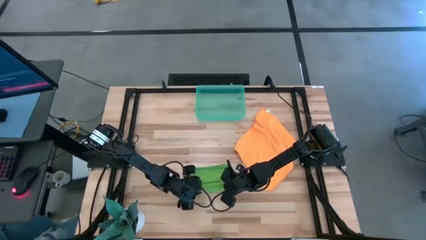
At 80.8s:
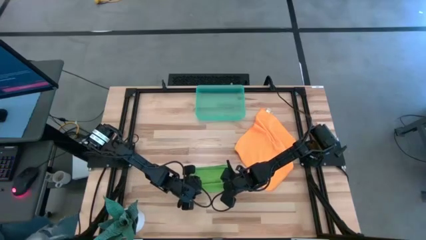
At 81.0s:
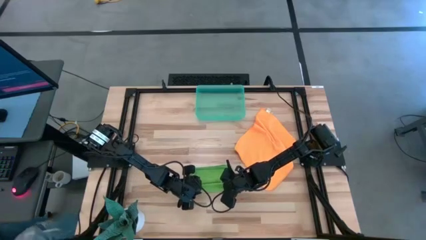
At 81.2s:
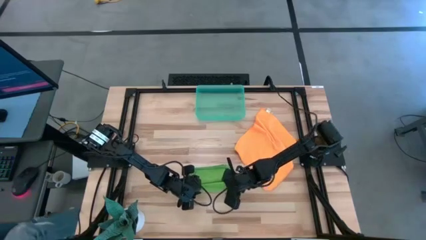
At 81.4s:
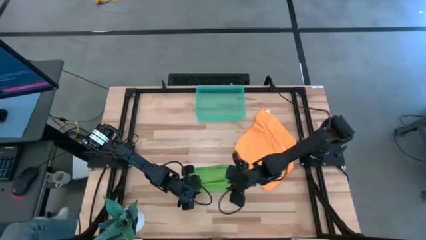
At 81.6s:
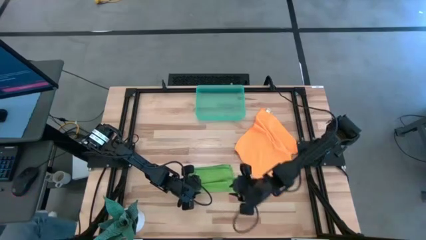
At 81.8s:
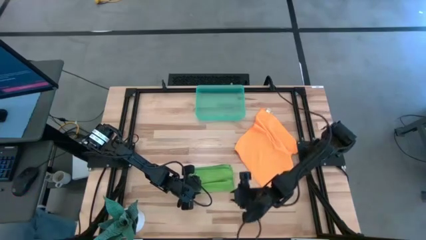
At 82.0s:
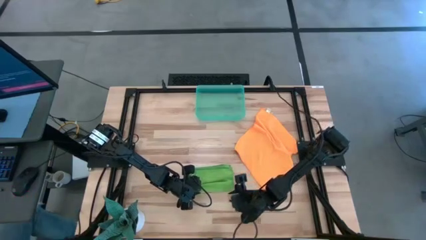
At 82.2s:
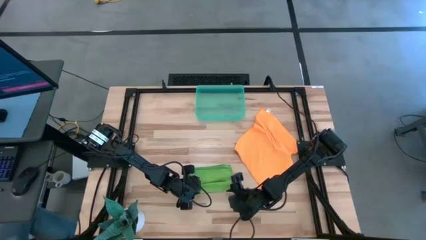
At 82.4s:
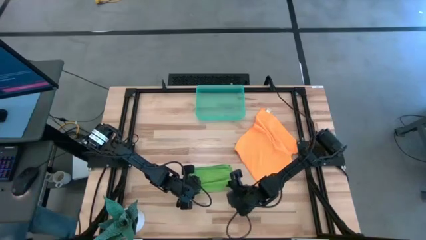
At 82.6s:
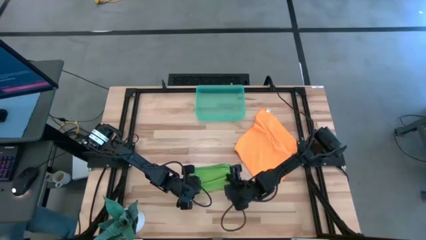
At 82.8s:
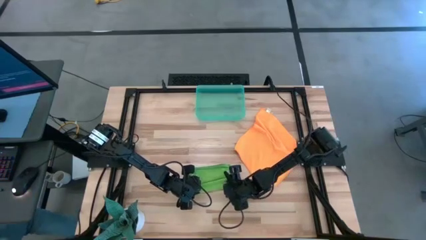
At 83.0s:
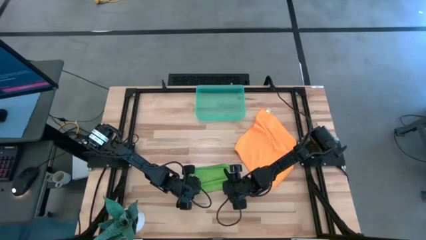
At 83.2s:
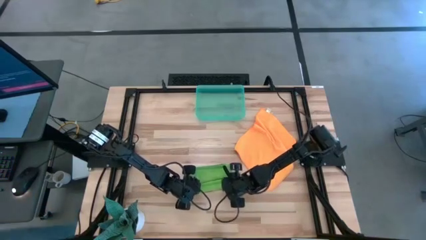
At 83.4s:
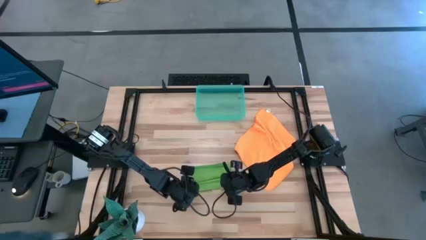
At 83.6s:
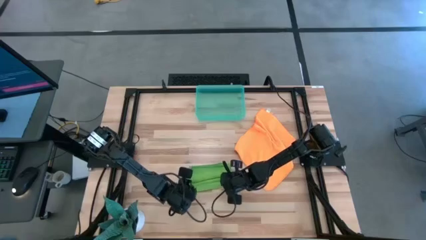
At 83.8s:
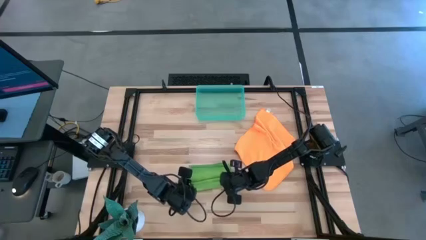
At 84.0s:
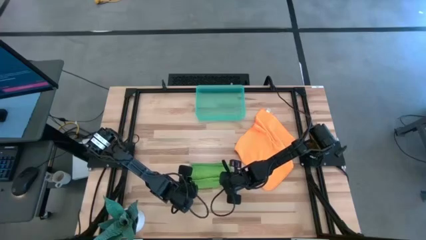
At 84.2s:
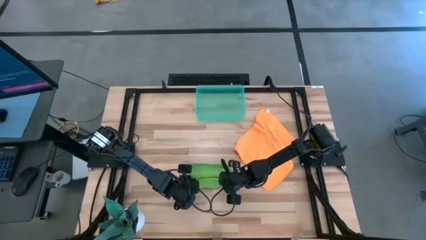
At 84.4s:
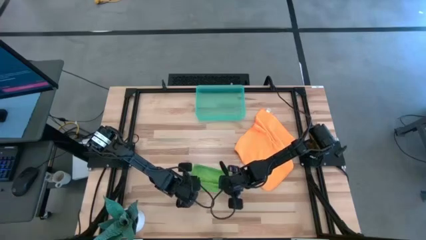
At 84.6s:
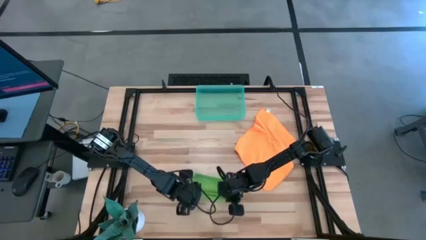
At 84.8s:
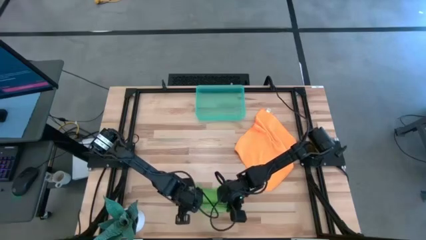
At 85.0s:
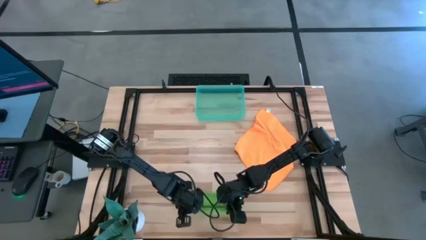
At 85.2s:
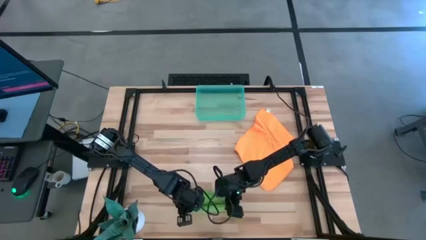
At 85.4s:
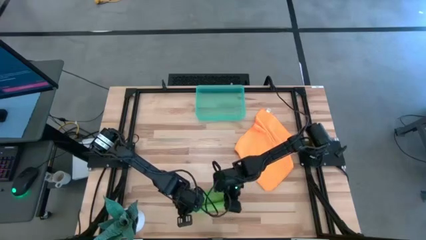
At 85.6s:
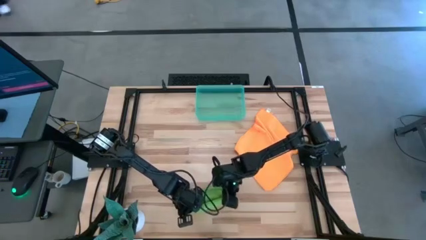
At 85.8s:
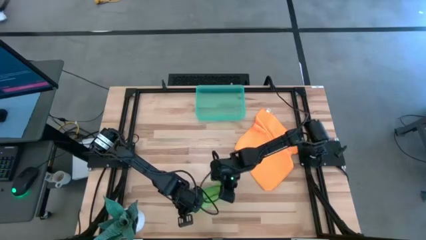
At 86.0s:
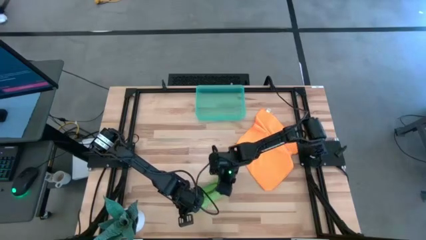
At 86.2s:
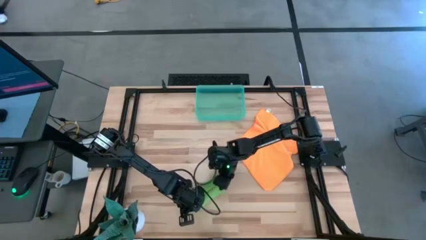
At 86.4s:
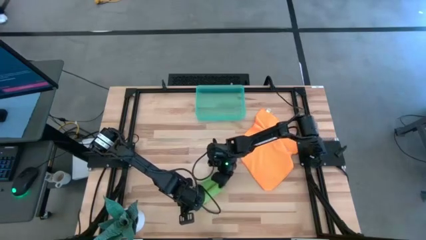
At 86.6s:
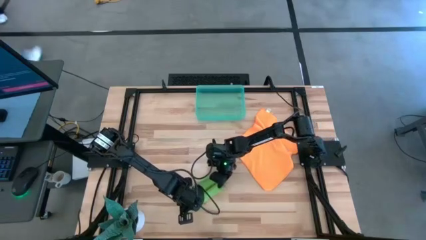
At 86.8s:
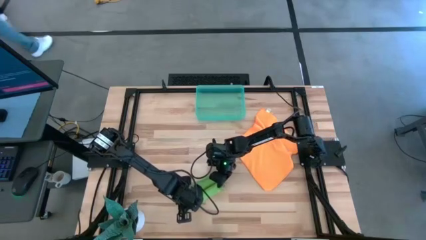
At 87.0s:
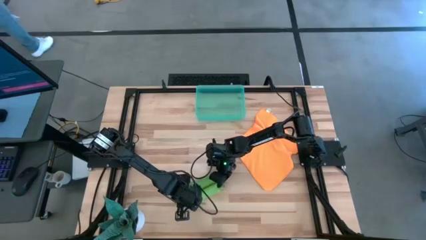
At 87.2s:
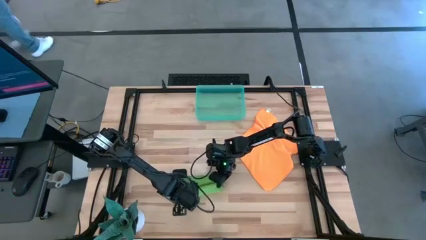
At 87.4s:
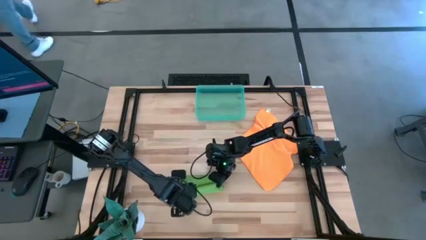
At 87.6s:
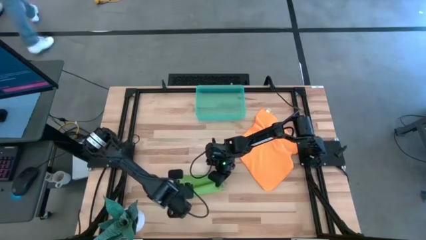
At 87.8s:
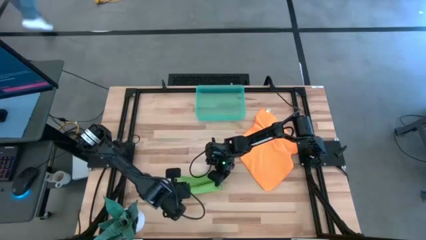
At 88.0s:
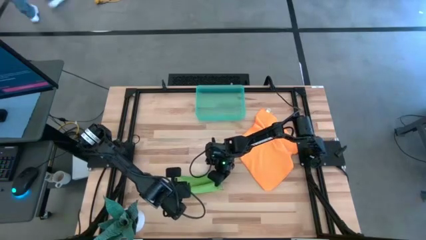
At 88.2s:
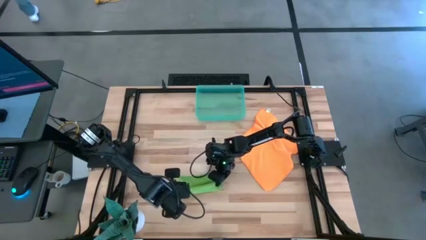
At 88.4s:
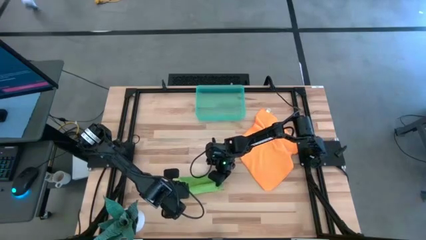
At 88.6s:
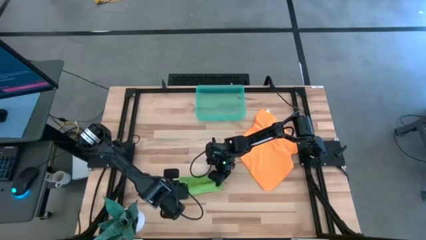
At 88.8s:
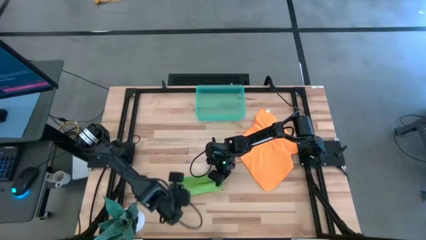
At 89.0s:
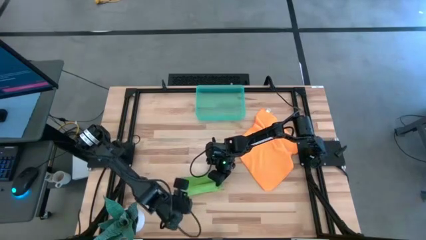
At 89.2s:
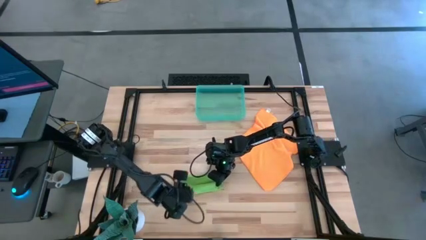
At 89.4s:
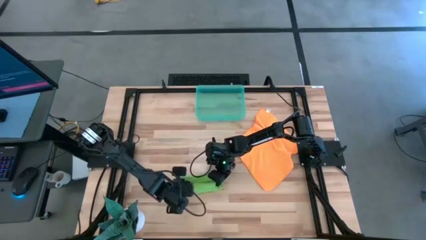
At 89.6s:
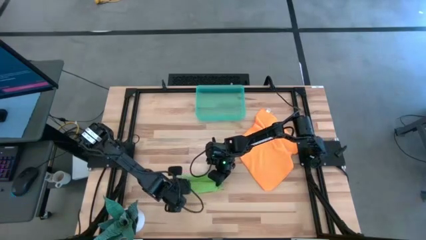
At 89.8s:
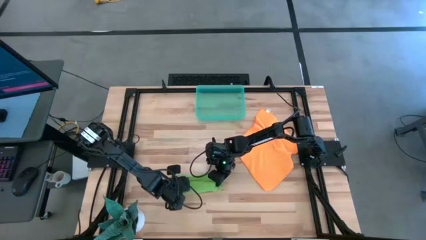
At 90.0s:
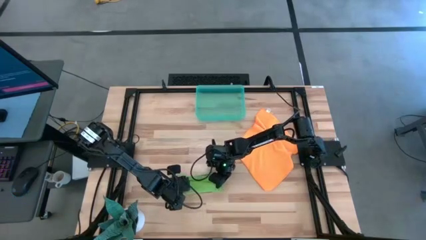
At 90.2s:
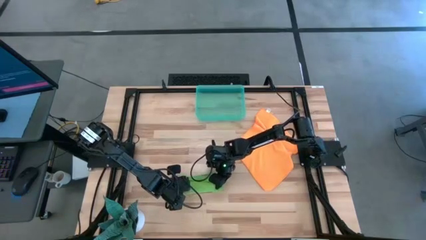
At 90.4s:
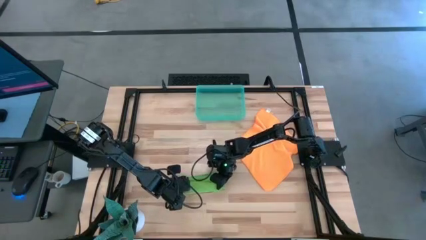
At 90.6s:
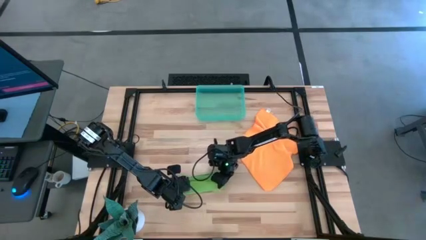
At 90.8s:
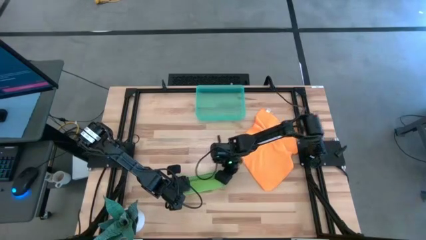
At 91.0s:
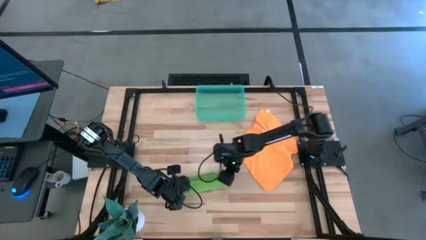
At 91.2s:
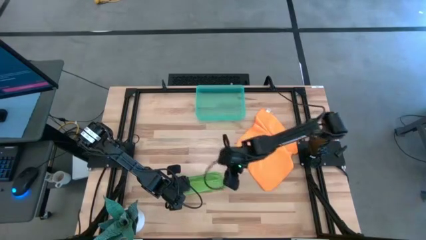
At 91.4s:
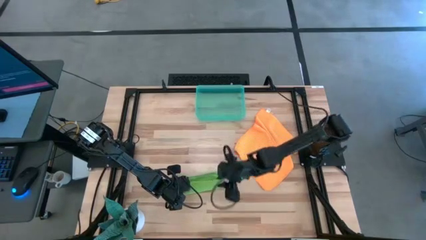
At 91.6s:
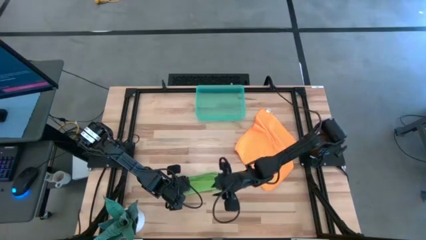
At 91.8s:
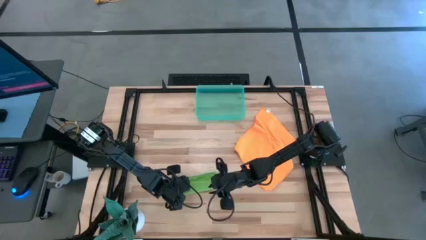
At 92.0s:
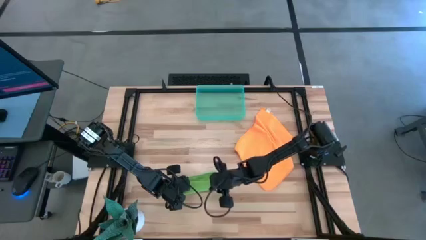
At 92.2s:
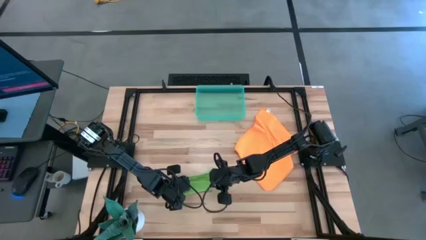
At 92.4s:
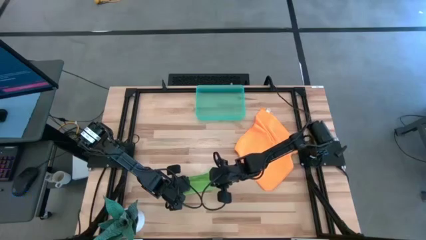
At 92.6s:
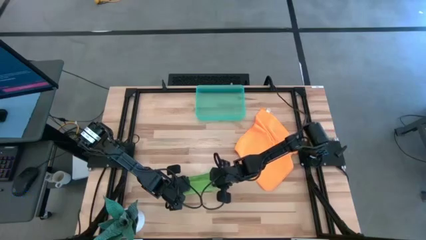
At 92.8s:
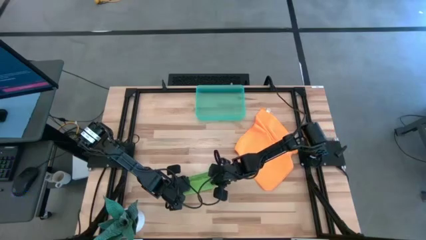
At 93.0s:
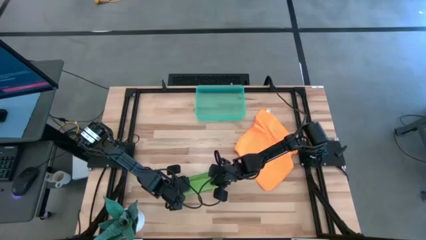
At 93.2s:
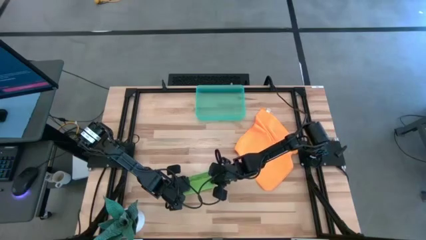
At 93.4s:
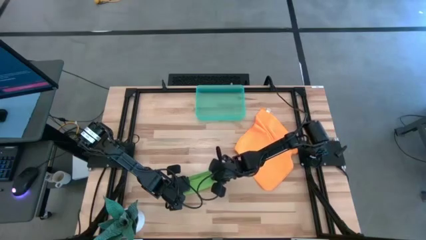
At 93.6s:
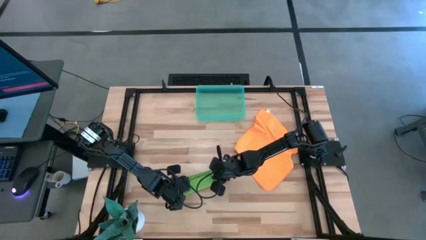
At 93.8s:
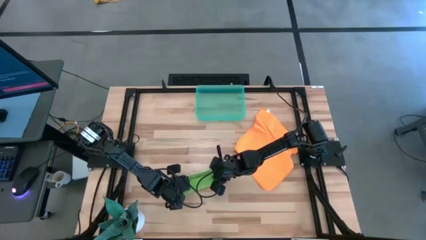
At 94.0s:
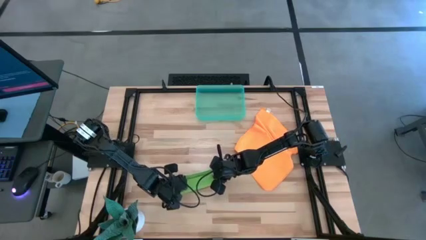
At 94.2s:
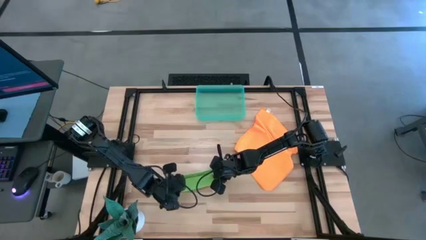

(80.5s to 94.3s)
Task: Roll microfiber towels into tight, uniform cylinder then place into a basket
Roll the green microfiber towel

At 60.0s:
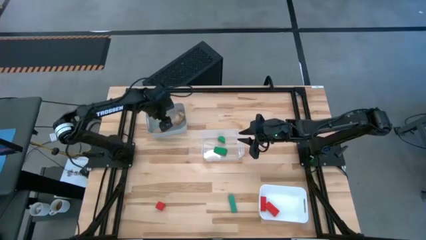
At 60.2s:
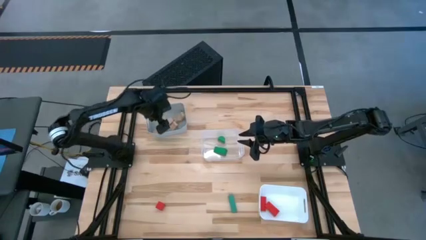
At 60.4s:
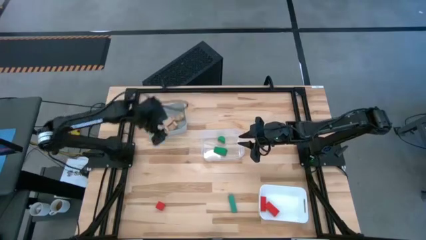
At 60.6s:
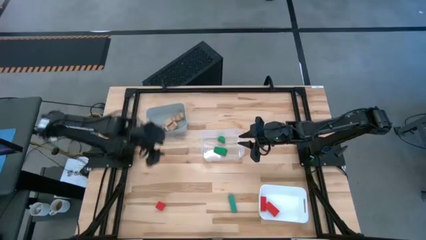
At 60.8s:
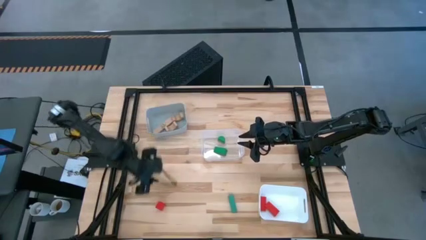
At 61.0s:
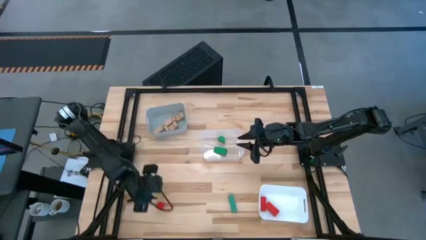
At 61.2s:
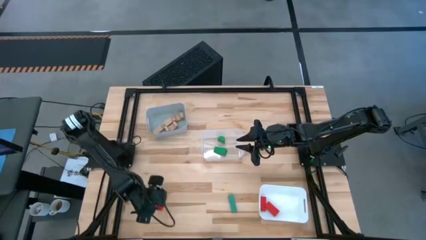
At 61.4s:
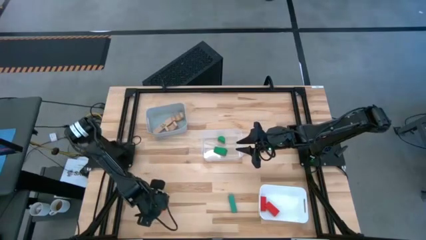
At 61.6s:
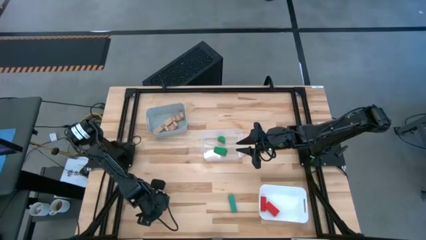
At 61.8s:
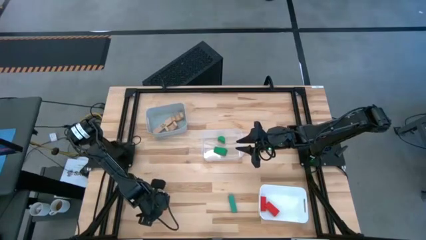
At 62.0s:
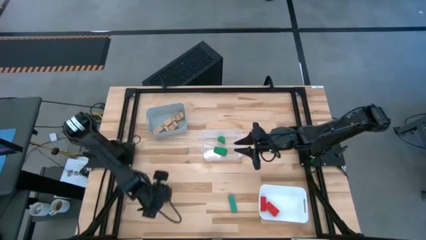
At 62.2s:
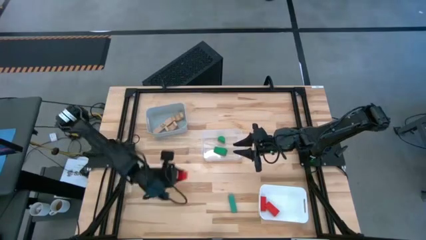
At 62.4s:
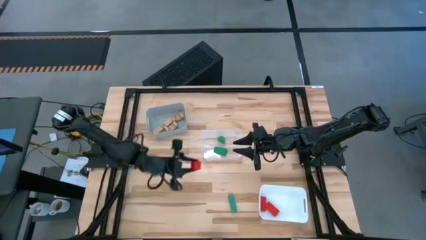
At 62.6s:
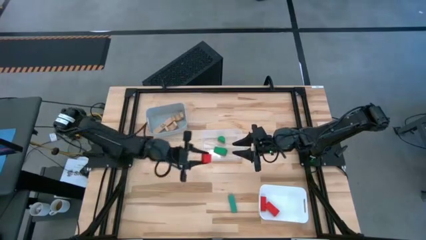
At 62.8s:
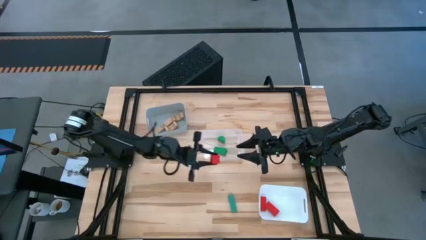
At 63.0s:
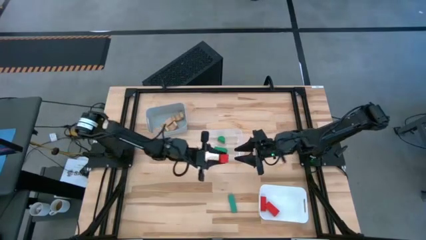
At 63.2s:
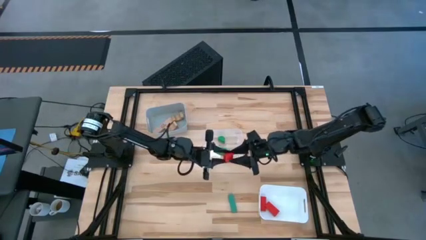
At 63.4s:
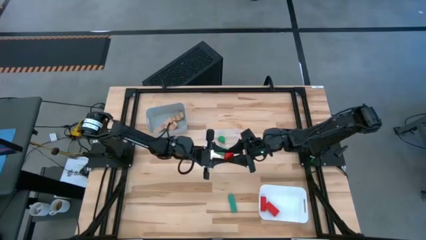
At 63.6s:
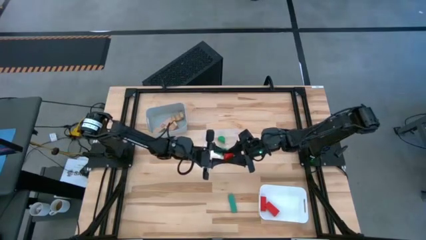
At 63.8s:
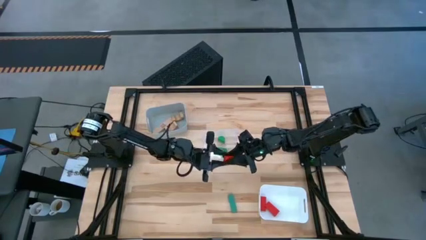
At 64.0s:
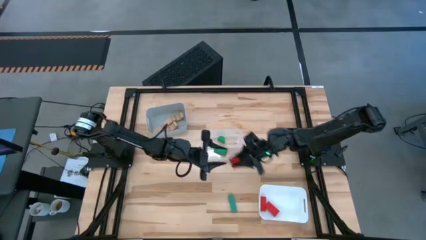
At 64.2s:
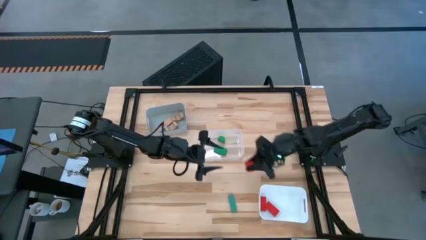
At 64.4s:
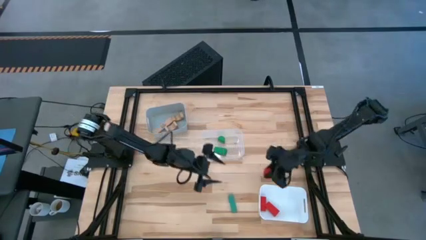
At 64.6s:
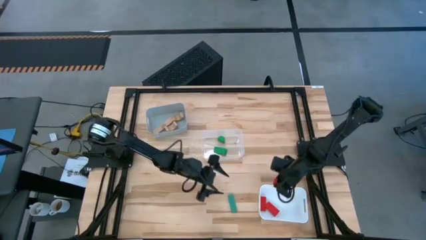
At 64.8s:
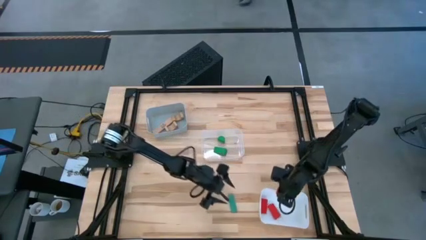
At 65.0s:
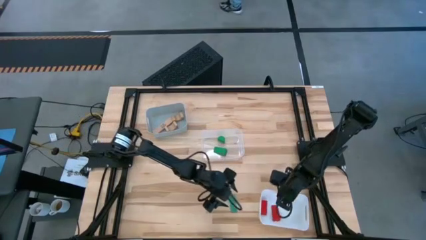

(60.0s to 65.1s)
Task: Sort & place blocks by color
Put the red block into the white bin
